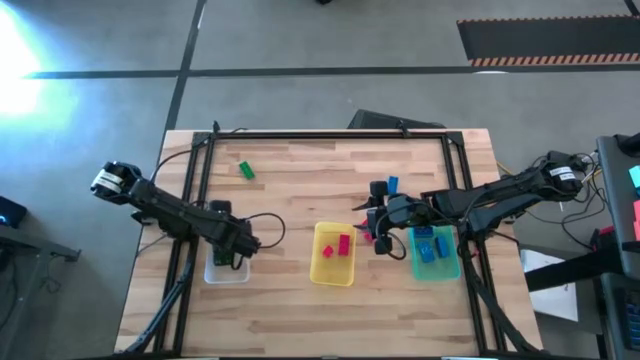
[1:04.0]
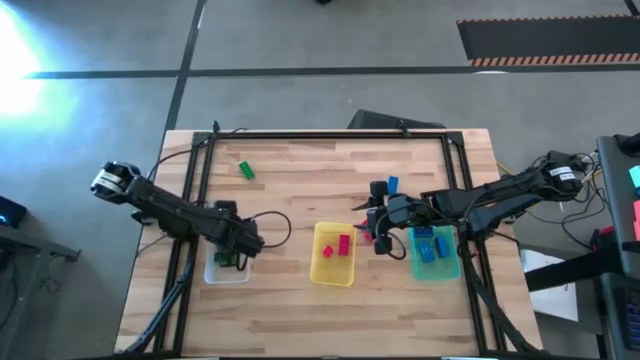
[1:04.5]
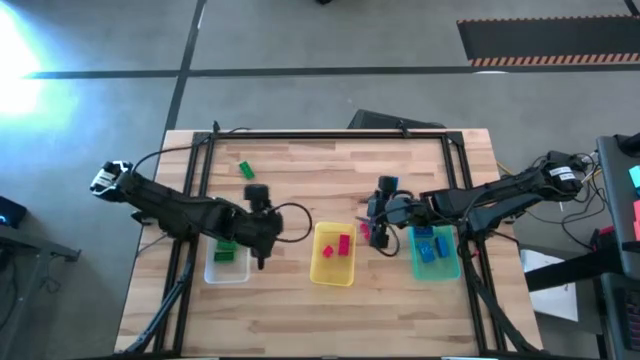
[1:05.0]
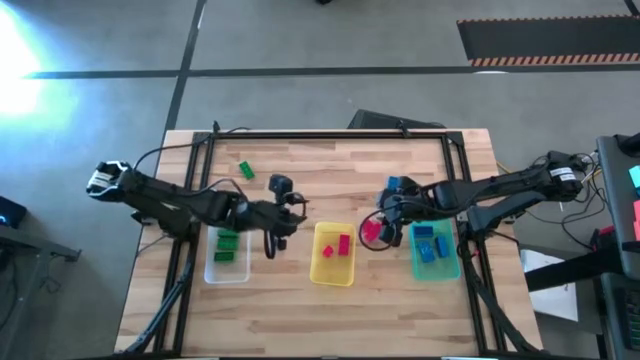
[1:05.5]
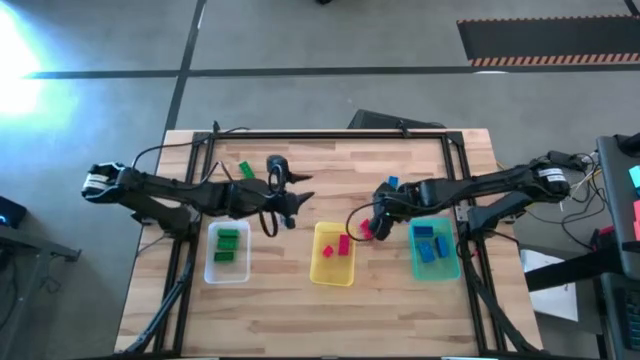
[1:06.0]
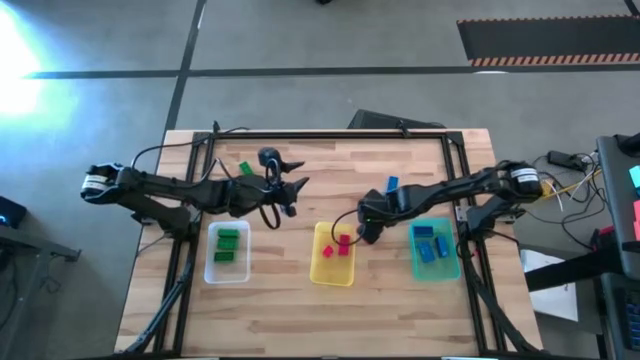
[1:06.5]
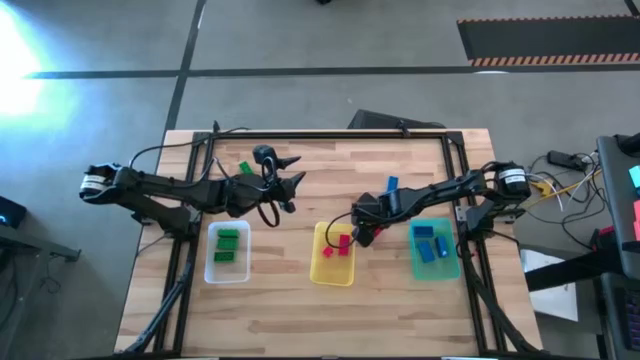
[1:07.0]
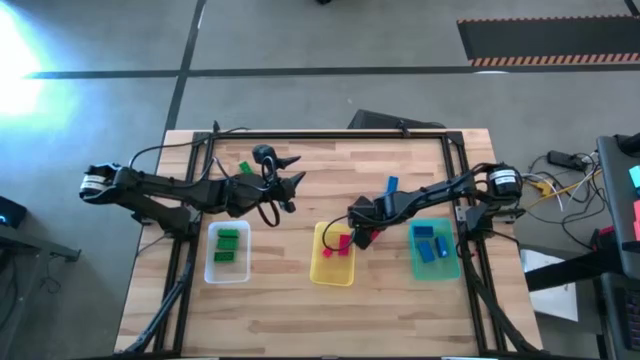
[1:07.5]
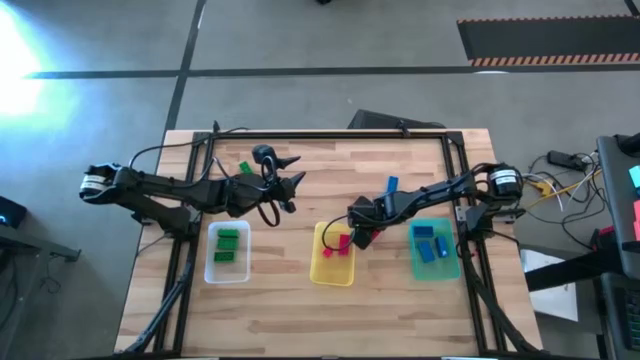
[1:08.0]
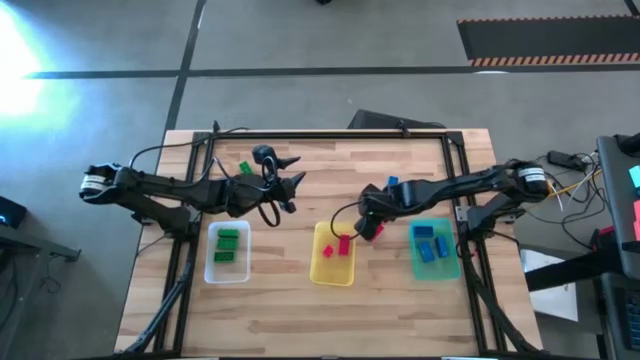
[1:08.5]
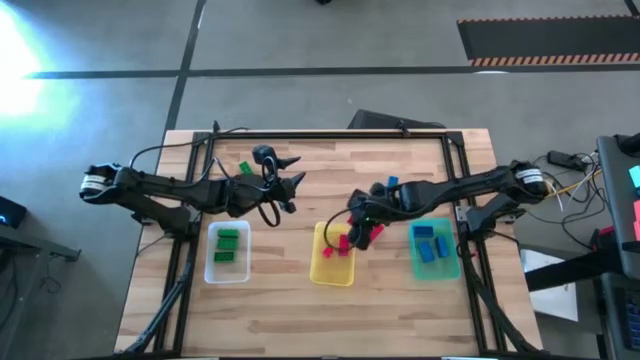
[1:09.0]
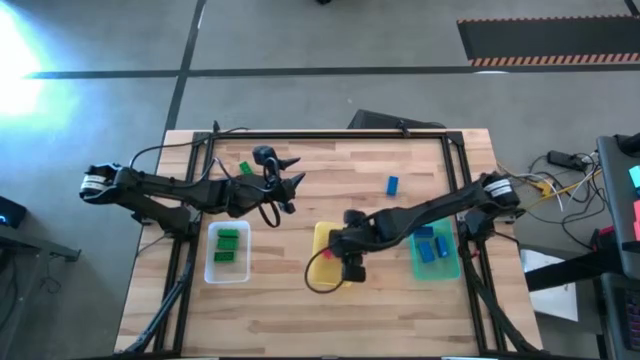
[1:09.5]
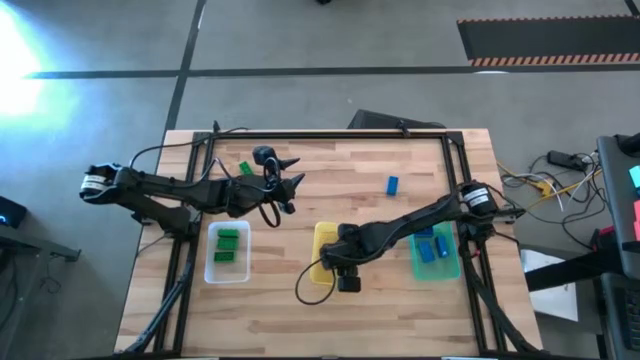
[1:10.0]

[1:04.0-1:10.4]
Task: Sort & place blocks by color
Put the red game piece into the yellow bin

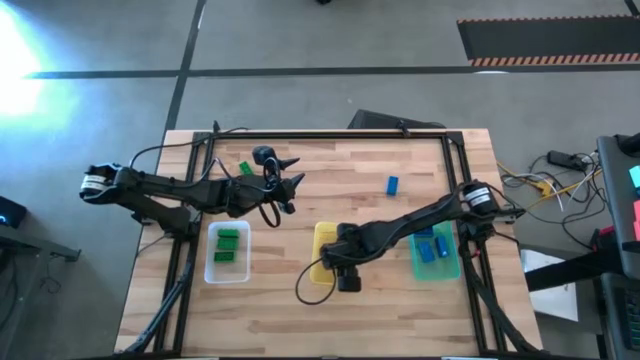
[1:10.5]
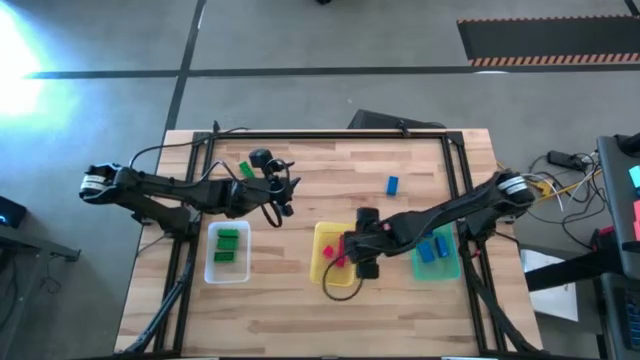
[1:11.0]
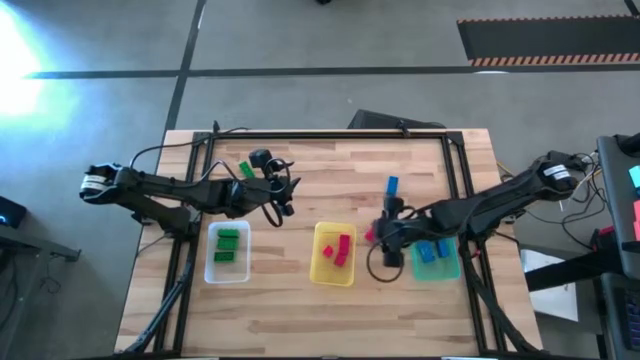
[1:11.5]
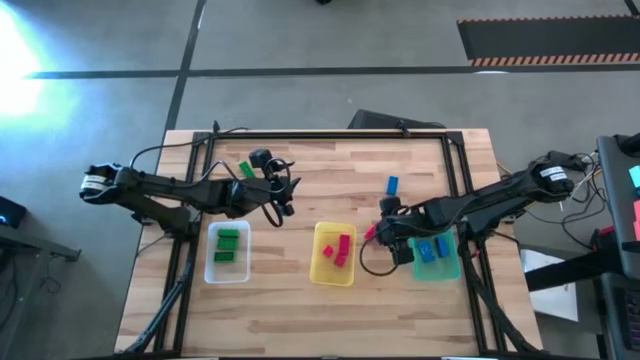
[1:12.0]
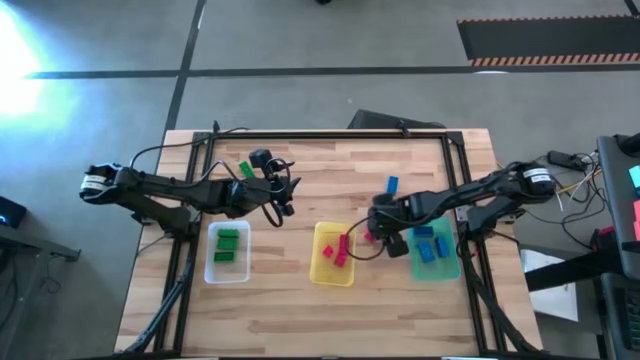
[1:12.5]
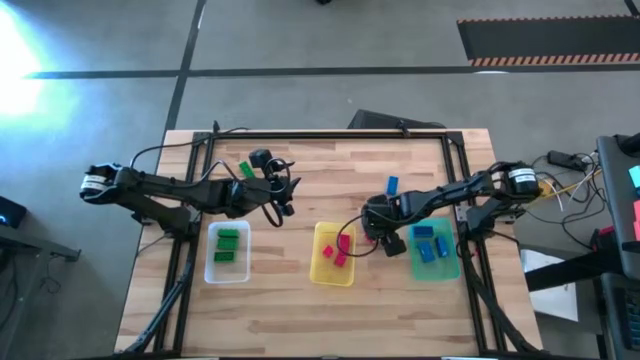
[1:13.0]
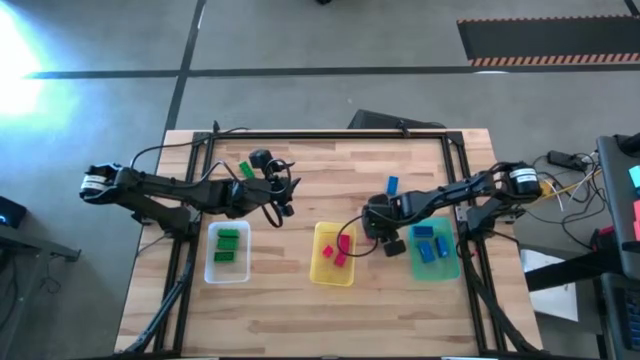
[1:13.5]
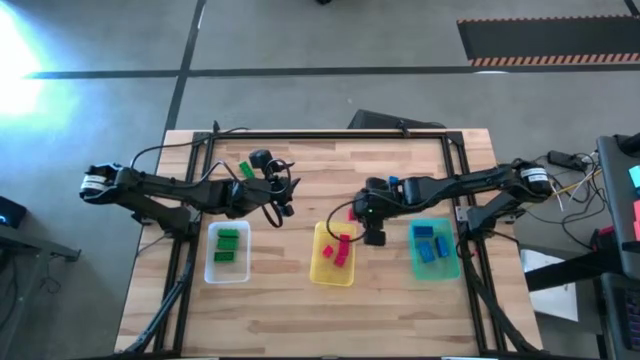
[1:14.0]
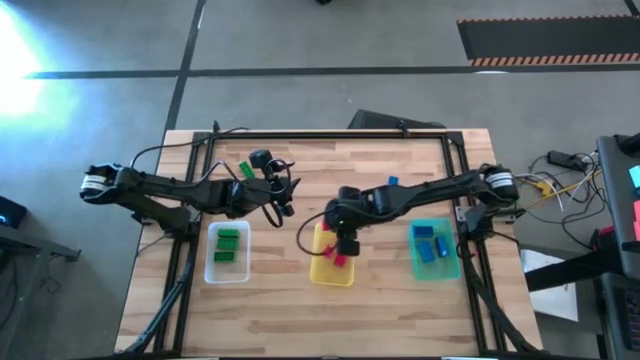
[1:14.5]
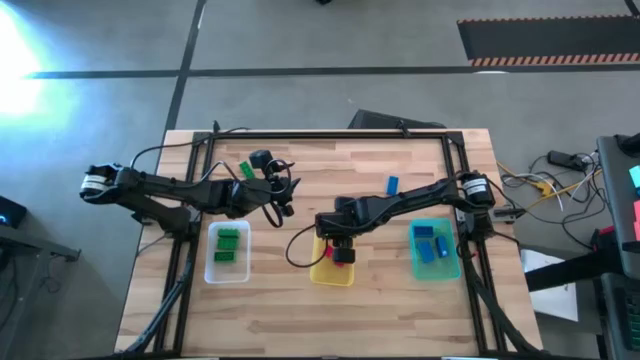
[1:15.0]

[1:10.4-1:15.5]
Put the red game piece into the yellow bin

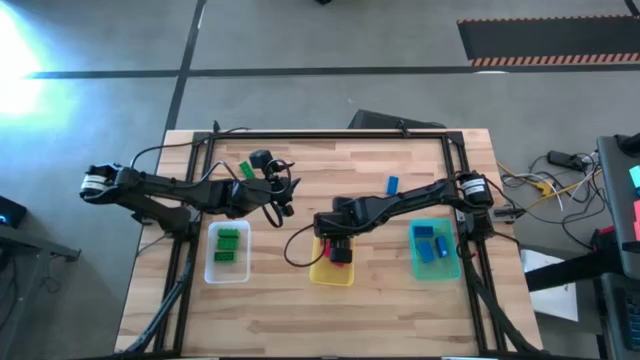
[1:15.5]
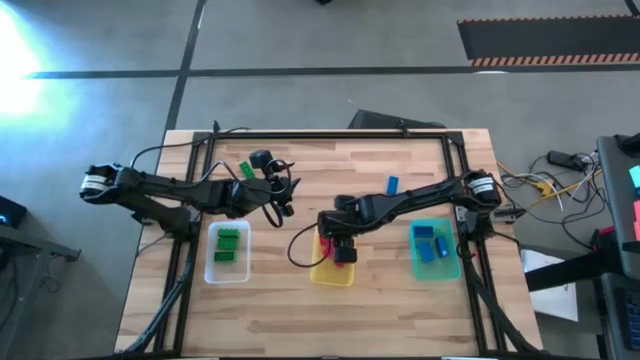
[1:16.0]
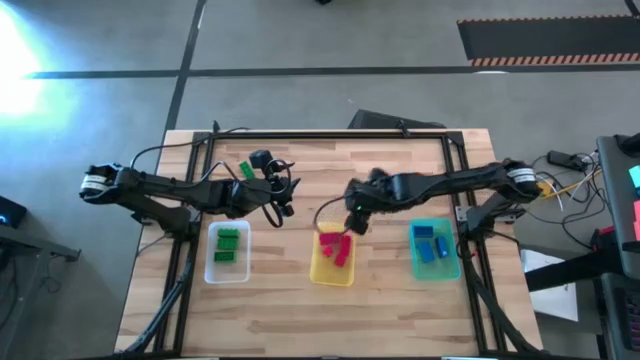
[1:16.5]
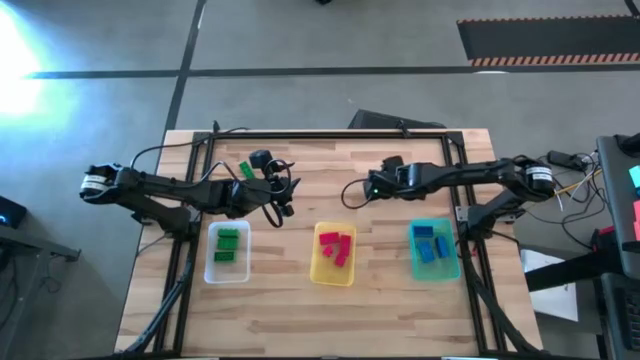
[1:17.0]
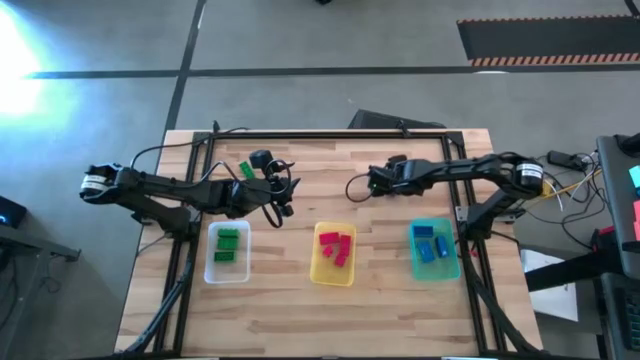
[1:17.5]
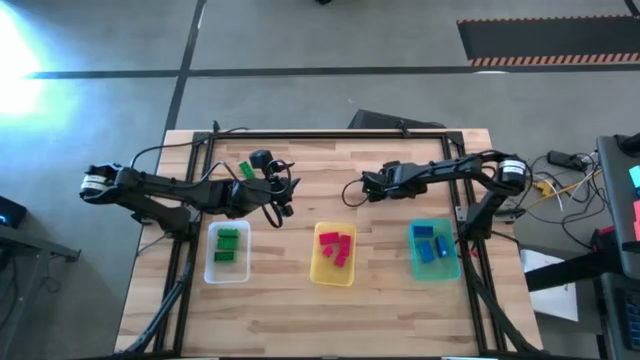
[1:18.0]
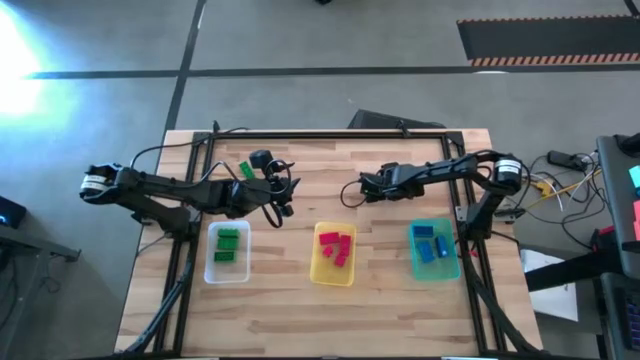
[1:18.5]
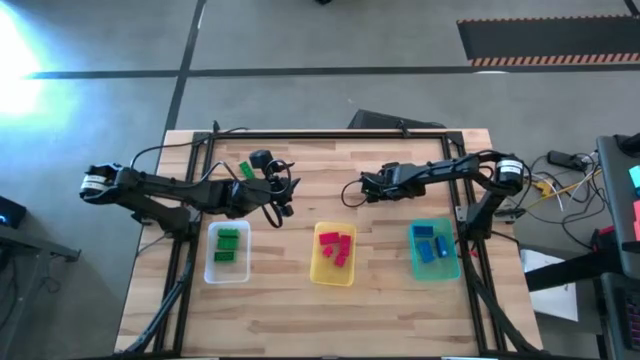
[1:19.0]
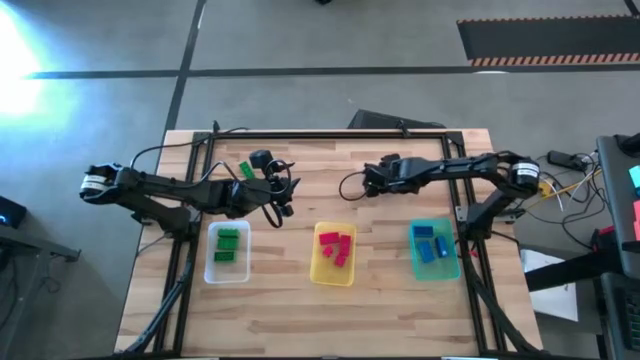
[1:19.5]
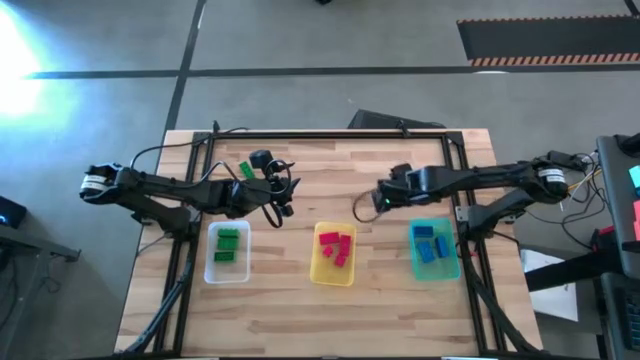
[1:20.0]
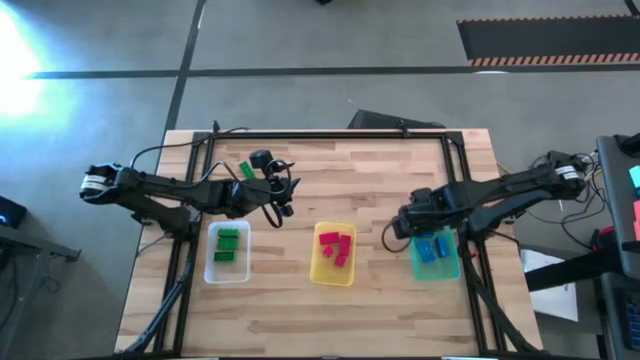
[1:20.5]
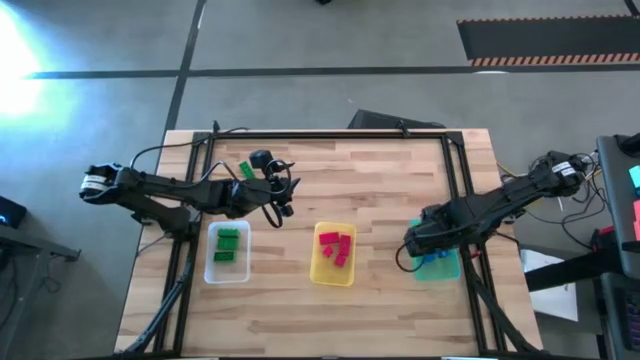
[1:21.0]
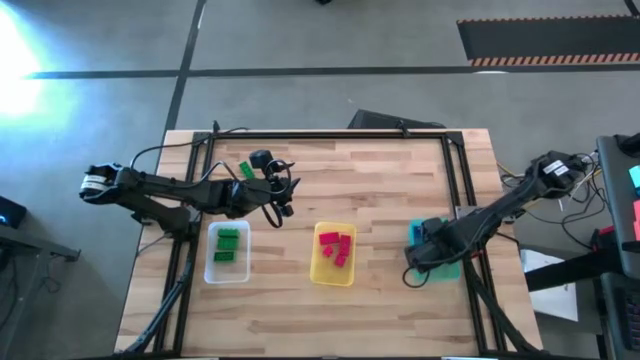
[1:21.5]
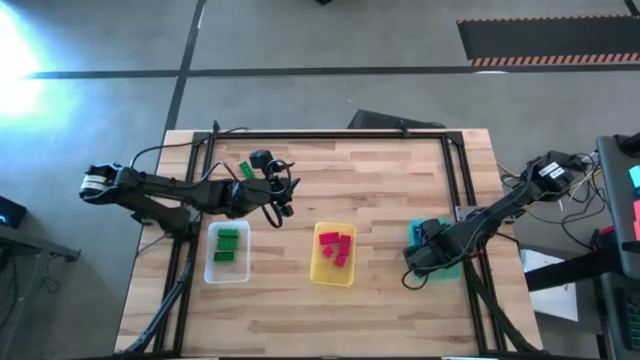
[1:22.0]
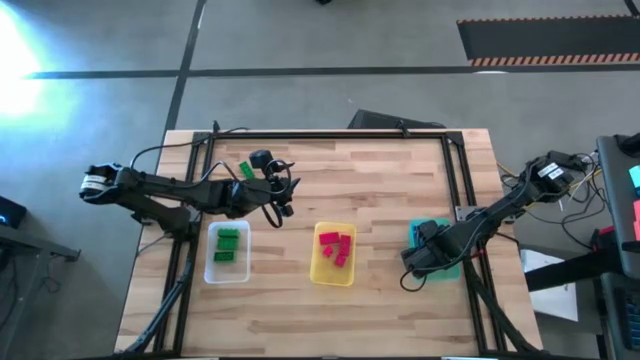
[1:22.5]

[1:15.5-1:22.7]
Put the blue game piece into the green bin

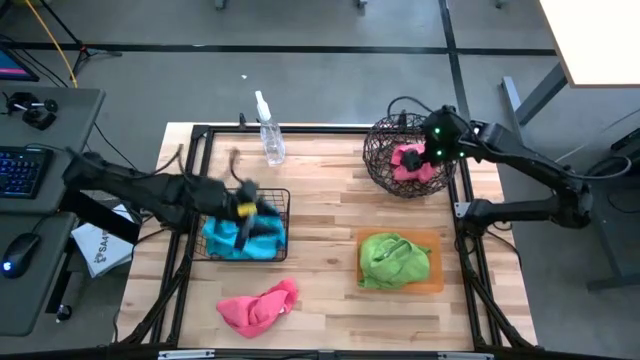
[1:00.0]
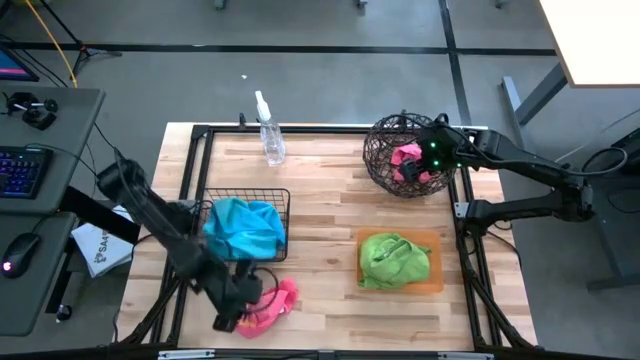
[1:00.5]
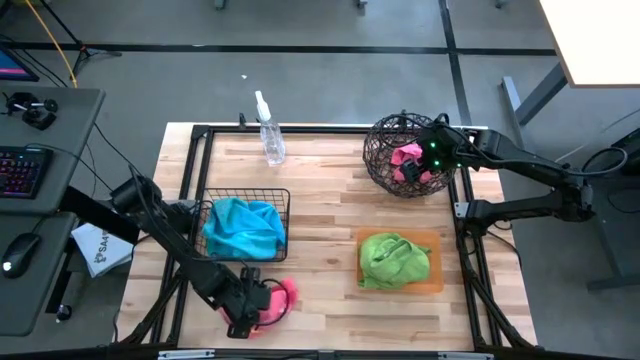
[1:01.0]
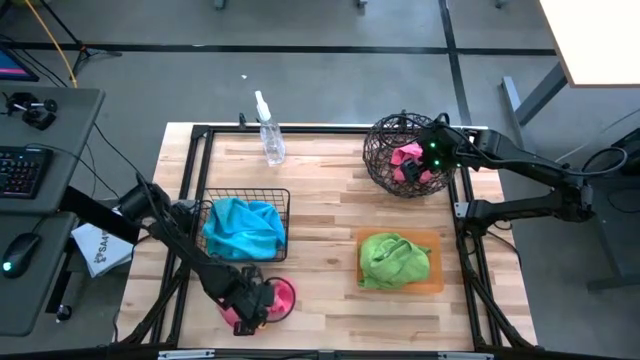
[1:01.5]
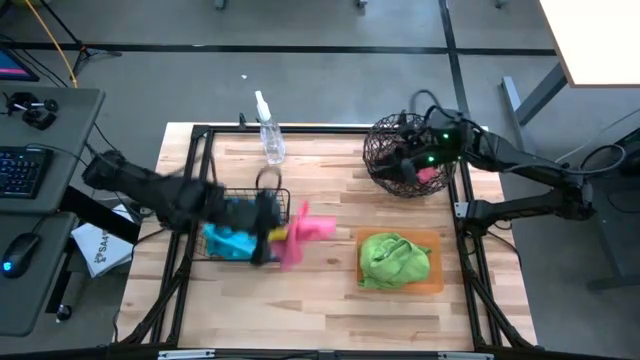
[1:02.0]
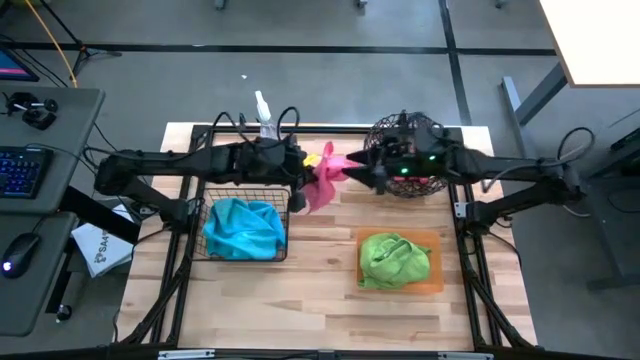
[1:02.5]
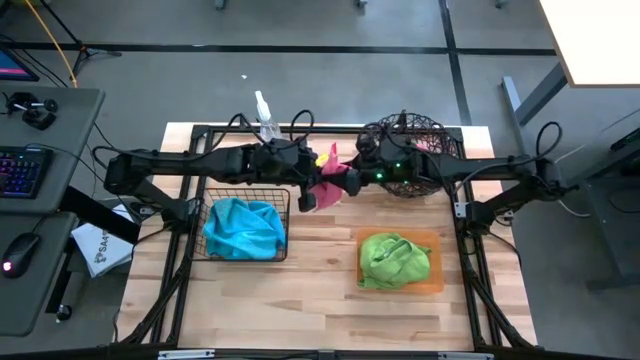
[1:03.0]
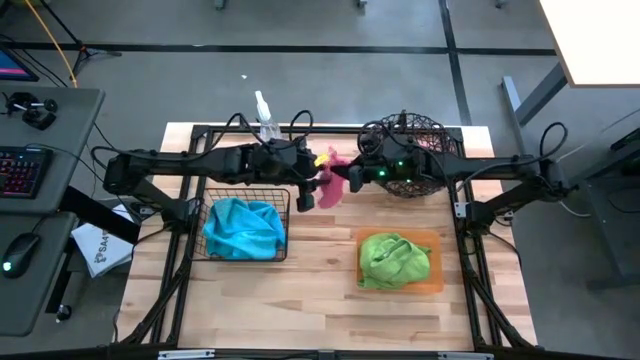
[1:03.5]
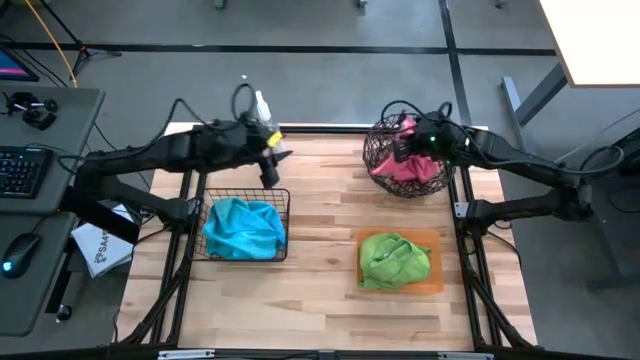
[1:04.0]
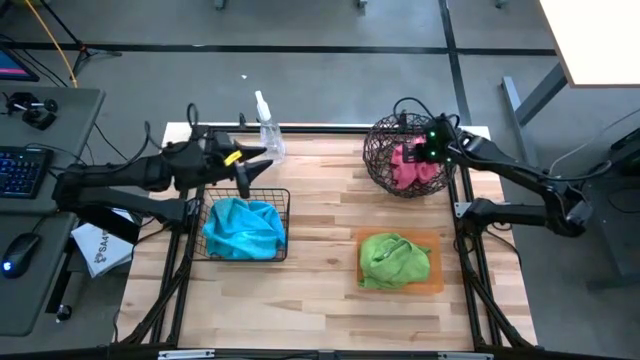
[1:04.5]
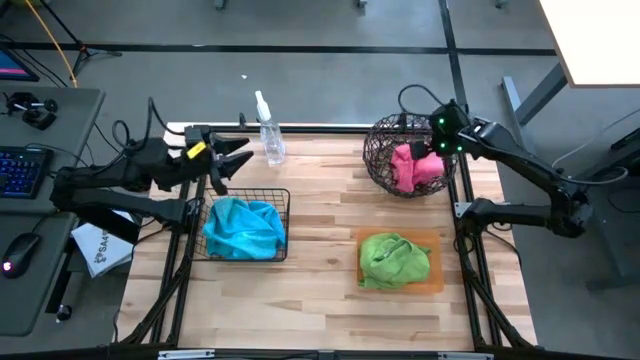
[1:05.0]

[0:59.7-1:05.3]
Task: Sort microfiber towel by color & place in baskets
Put the pink microfiber towel into the right wire basket
